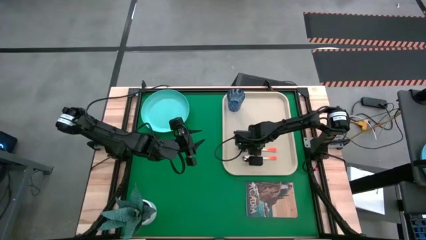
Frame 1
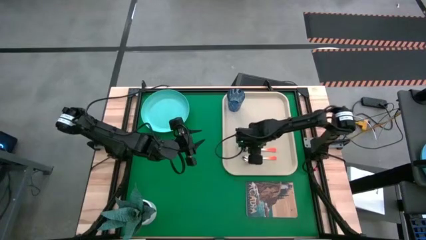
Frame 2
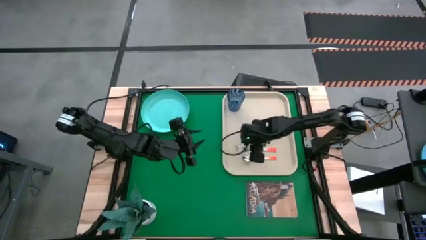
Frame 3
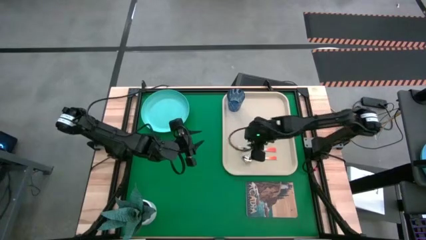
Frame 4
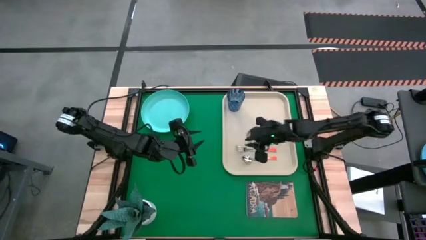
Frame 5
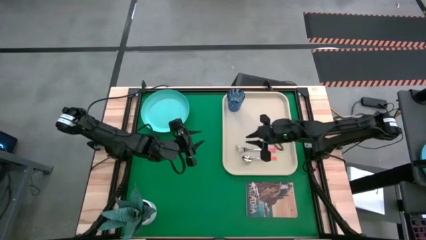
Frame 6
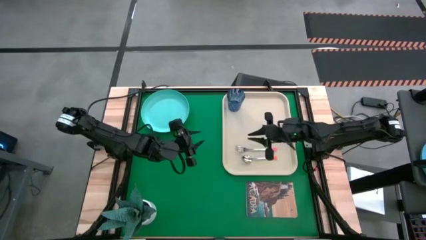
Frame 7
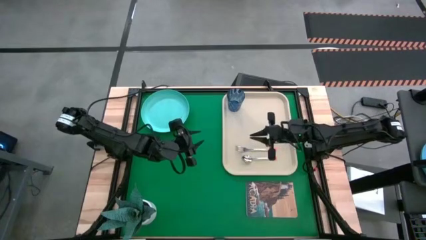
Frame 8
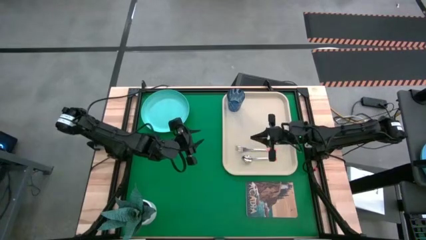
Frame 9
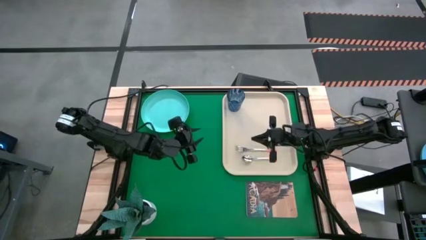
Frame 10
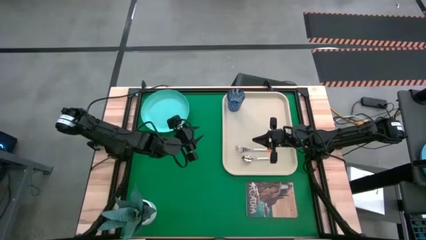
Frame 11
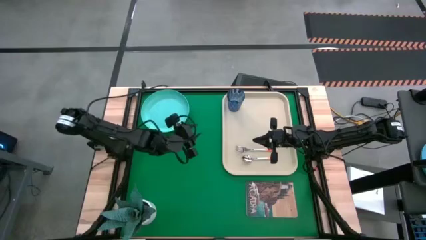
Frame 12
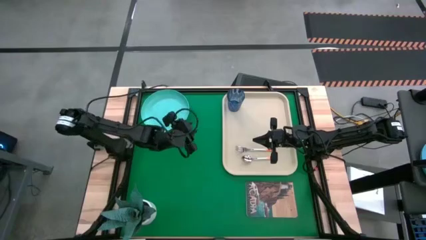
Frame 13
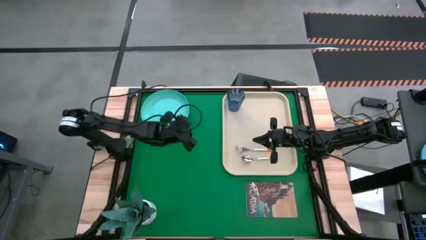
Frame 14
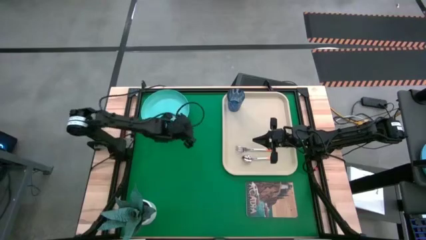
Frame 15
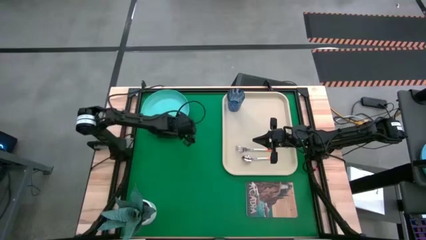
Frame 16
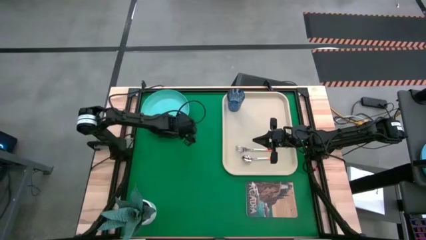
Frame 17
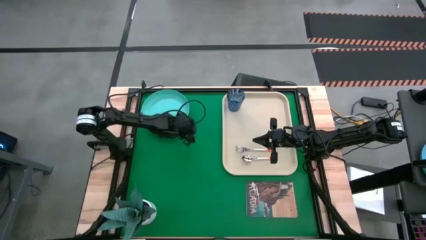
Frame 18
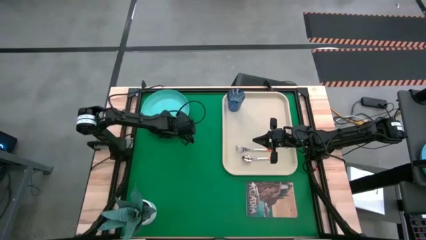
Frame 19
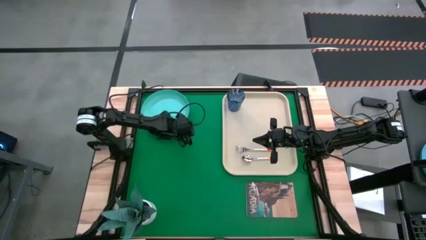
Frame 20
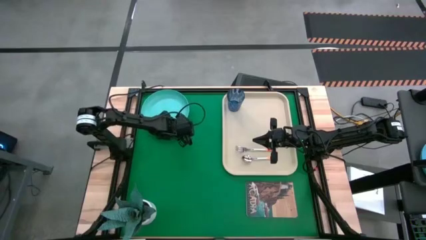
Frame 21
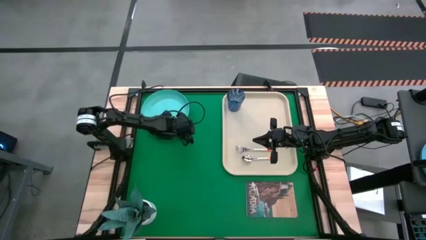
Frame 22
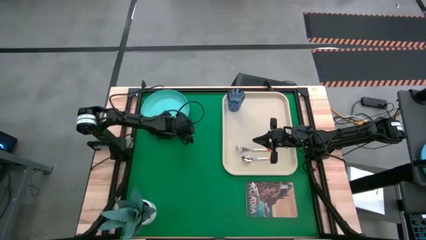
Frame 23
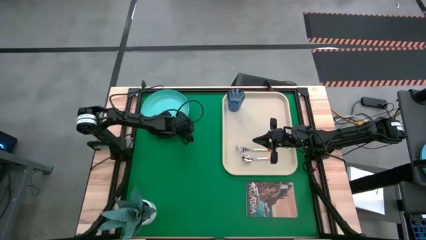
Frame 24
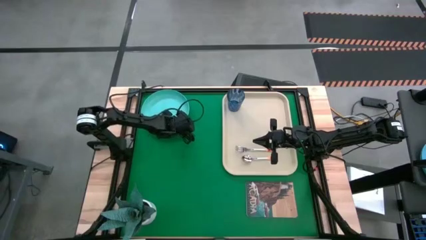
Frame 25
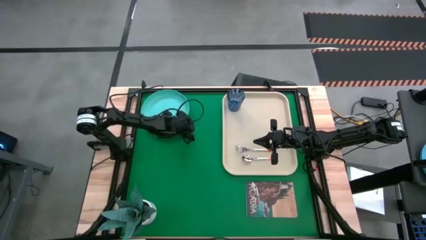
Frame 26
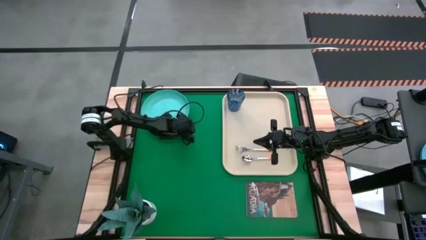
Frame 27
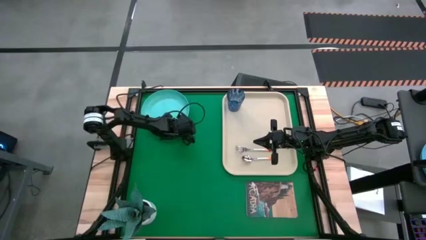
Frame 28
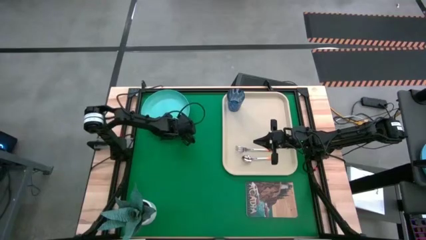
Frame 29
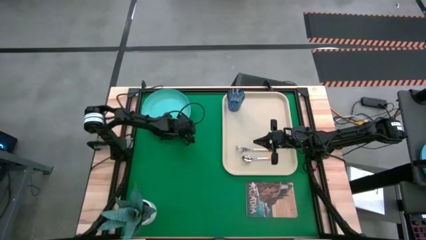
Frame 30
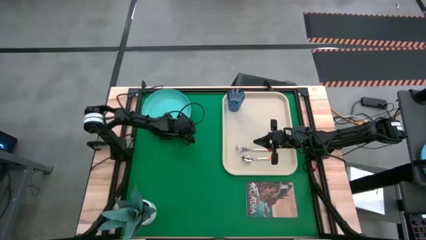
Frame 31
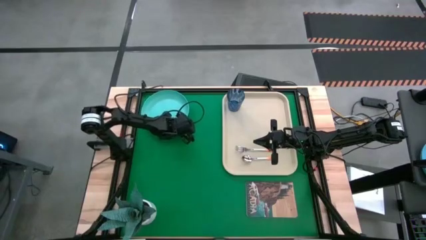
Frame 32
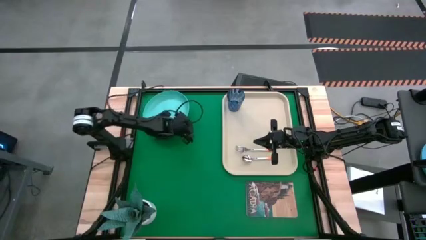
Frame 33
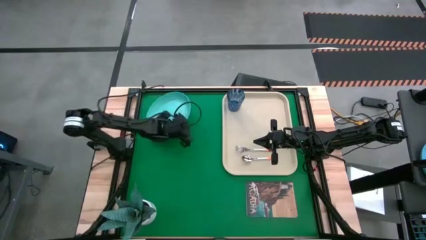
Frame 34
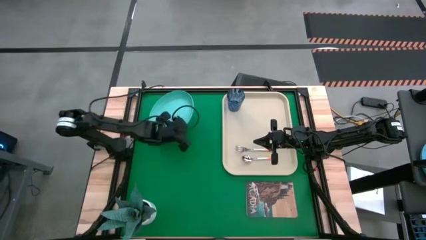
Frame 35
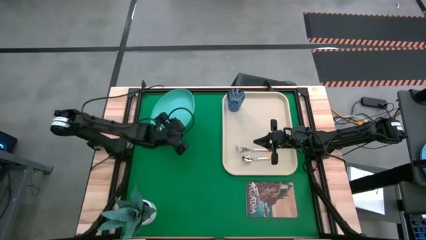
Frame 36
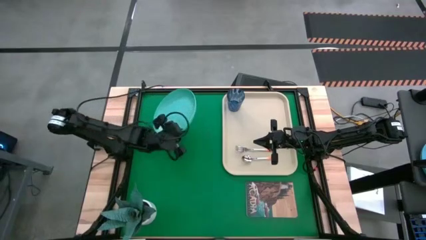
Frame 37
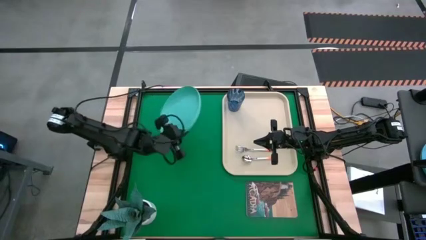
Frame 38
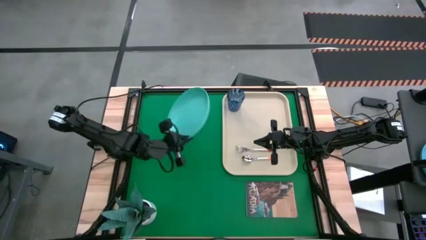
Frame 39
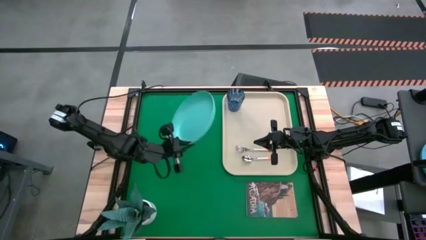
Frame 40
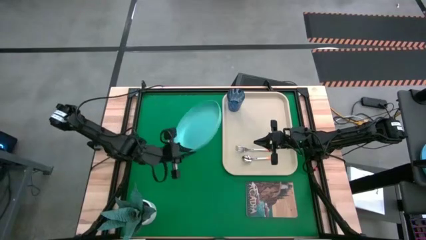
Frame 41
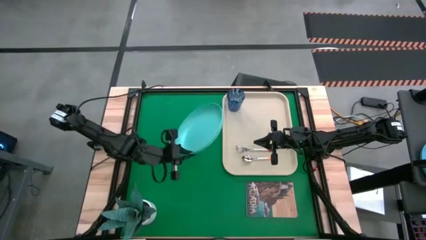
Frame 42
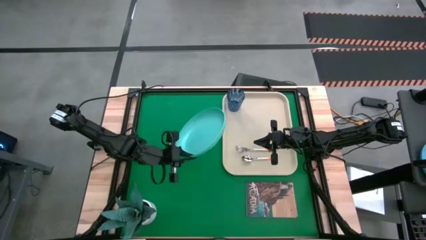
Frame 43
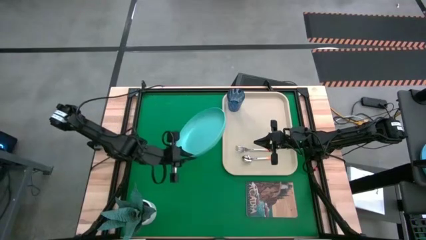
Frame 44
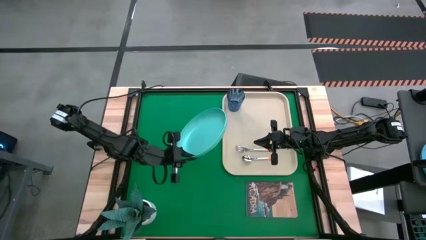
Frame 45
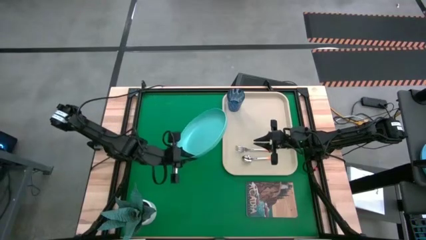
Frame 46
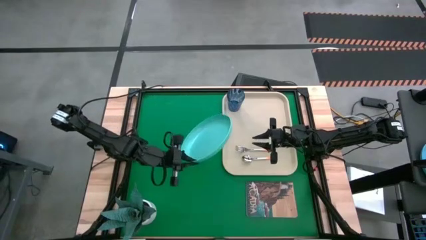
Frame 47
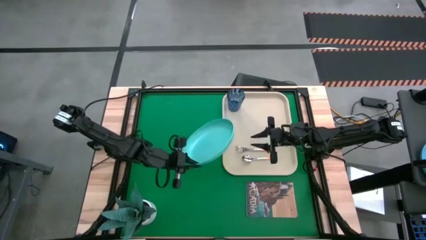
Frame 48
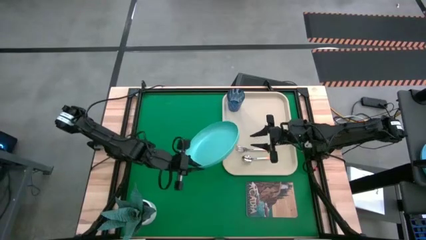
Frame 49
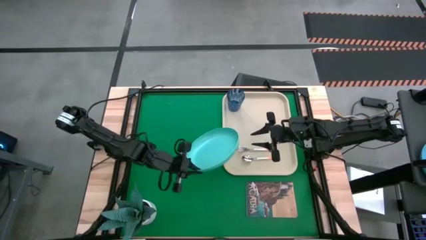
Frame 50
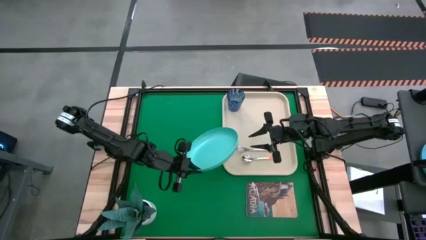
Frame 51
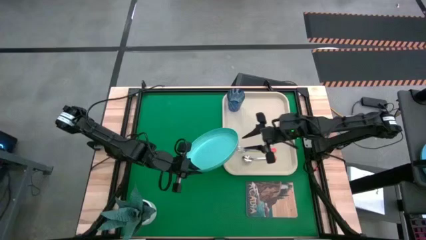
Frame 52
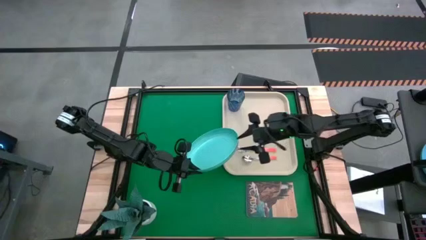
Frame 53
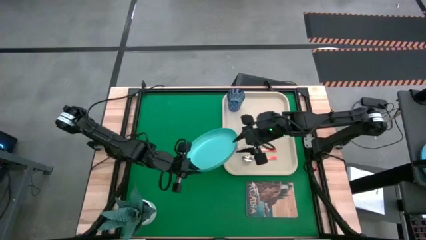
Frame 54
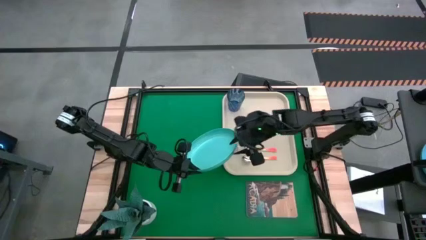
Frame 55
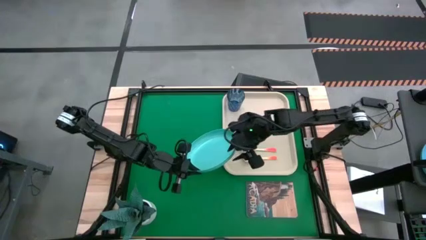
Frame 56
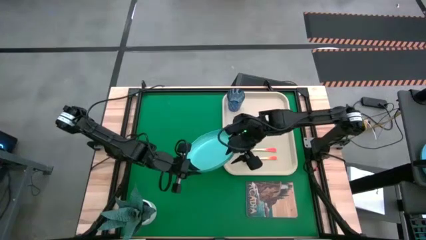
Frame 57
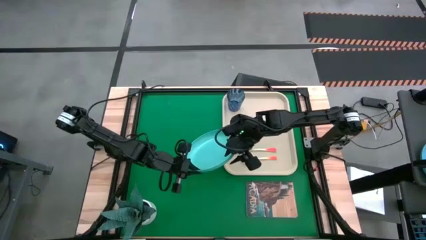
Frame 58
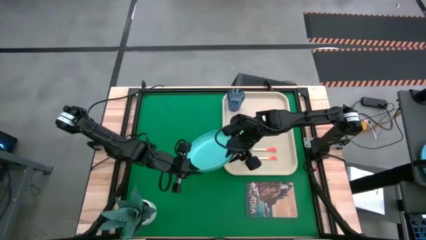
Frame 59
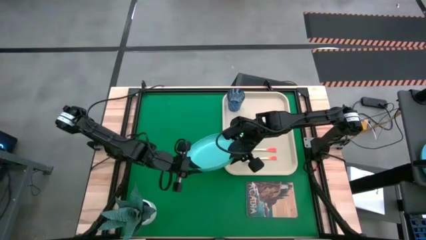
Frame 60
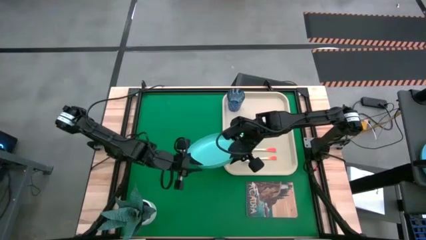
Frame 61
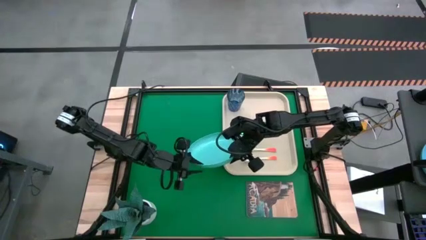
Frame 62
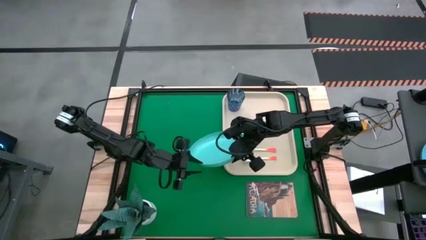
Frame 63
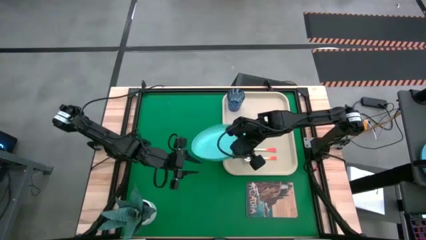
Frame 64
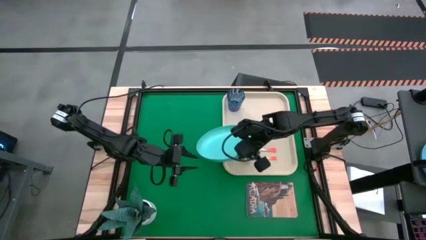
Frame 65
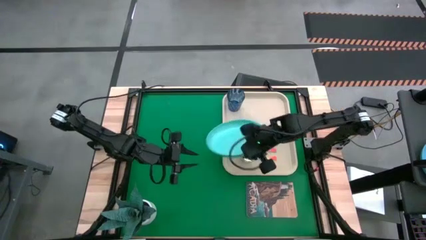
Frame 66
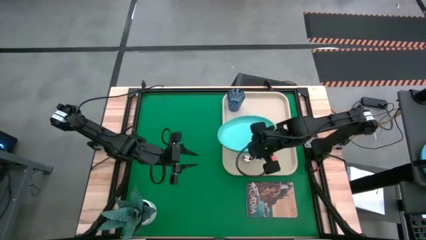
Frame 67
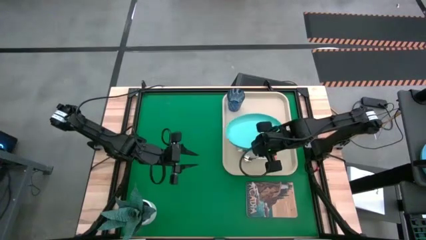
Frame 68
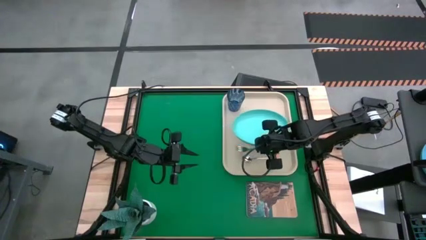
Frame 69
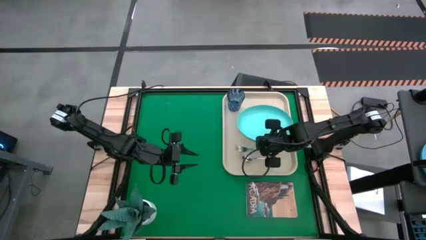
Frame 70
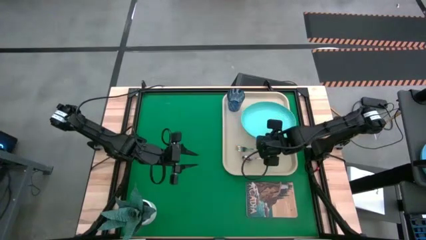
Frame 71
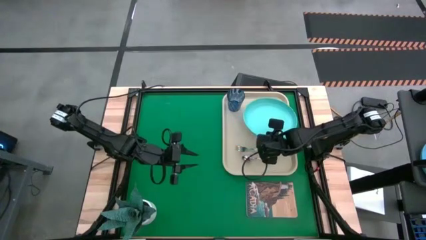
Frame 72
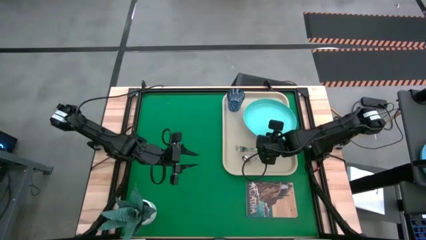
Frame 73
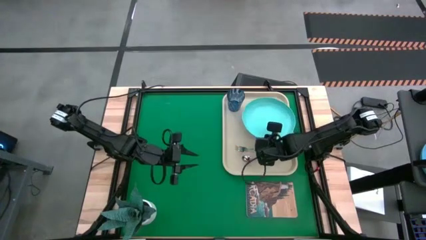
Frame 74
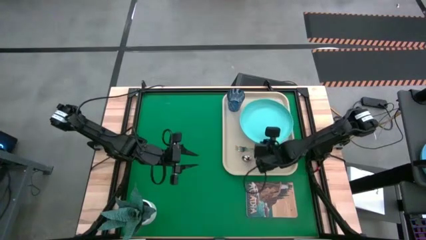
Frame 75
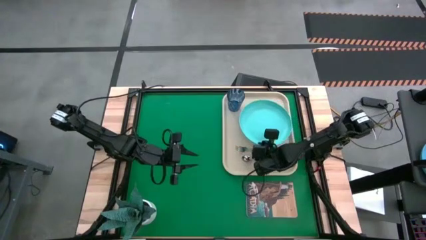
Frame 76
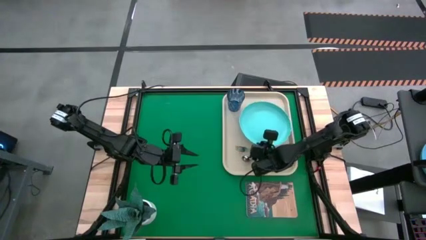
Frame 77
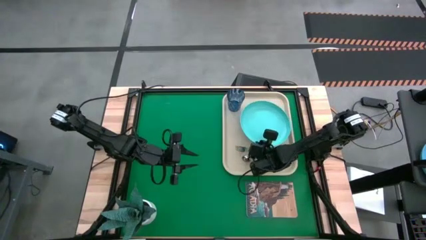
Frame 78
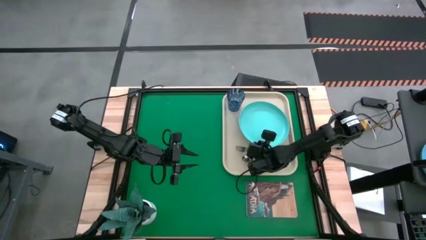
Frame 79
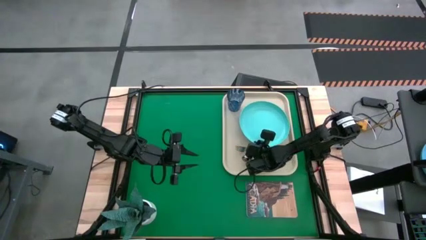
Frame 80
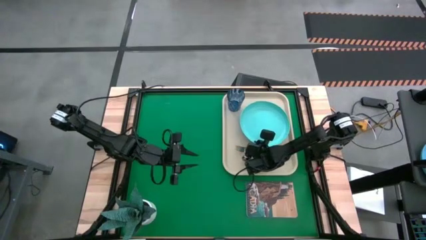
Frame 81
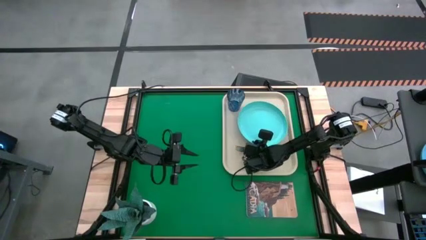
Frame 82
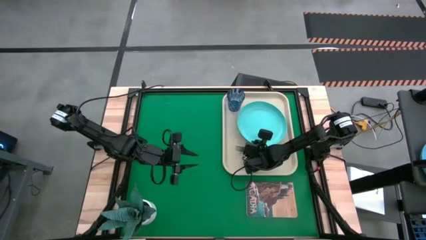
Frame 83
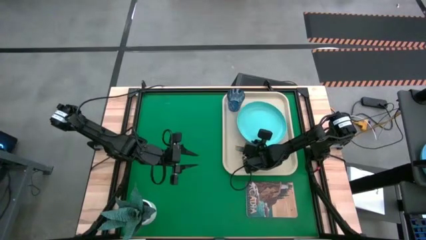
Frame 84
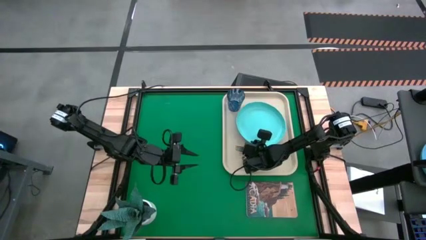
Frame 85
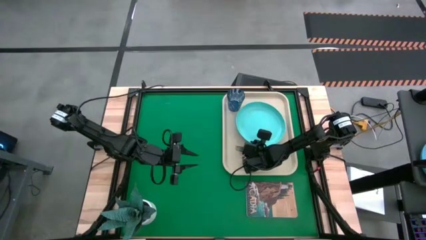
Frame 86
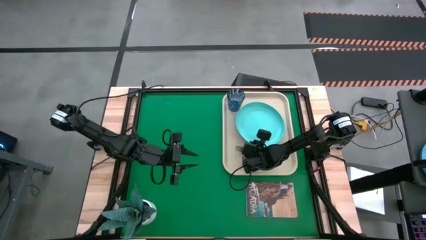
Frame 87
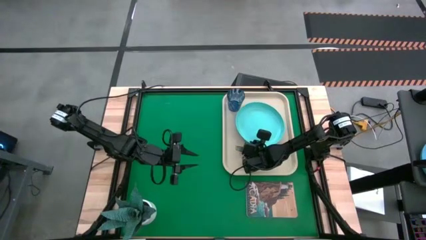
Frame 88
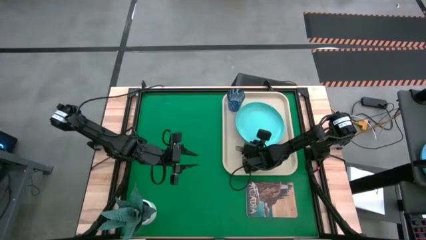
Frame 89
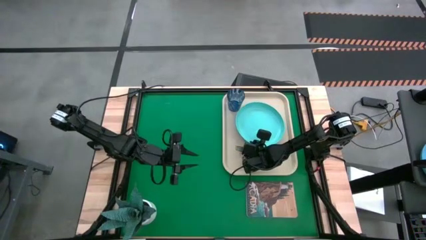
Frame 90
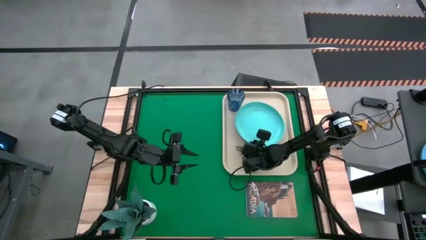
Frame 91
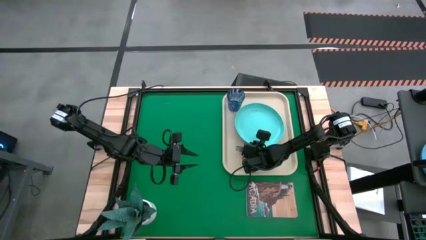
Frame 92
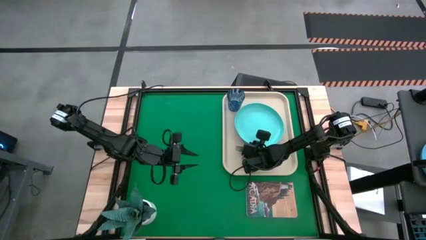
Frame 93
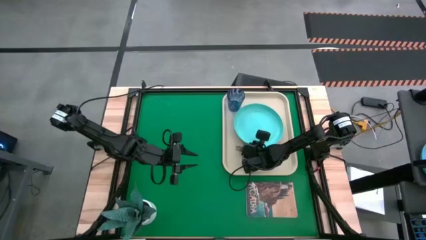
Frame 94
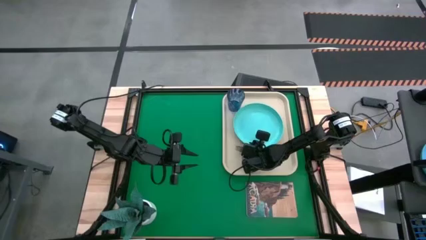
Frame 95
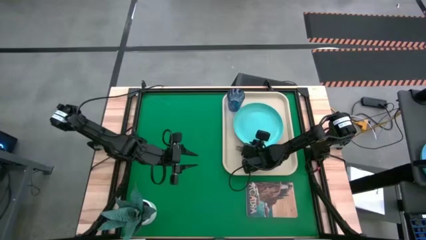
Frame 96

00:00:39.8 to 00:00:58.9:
Task: Pick and place plate/cup/fork/spoon on tray
Put the blue plate on the center of the white serving tray
